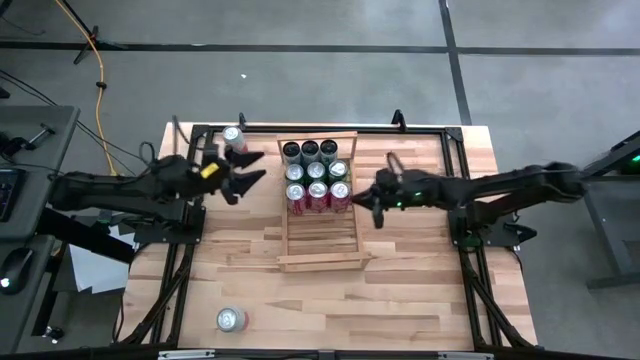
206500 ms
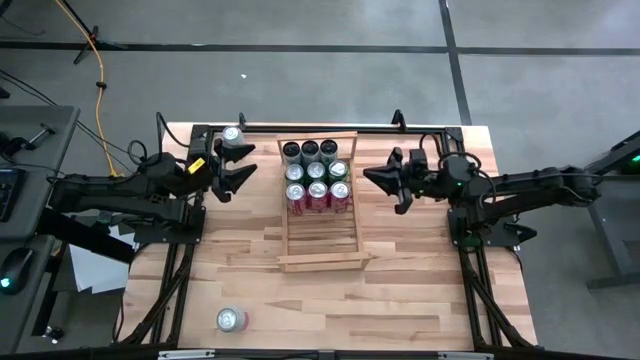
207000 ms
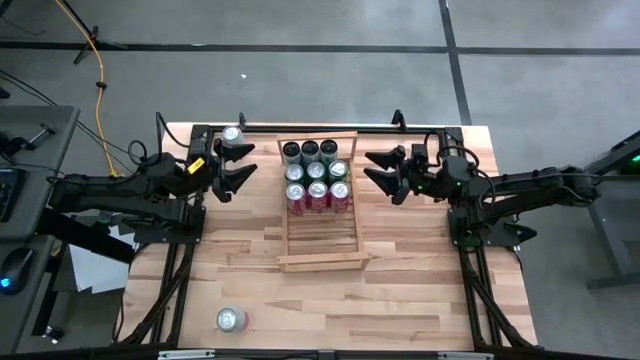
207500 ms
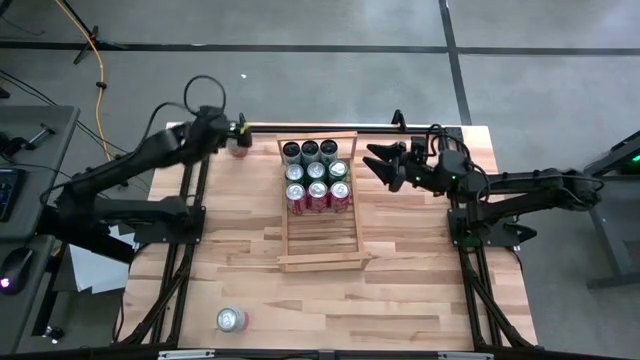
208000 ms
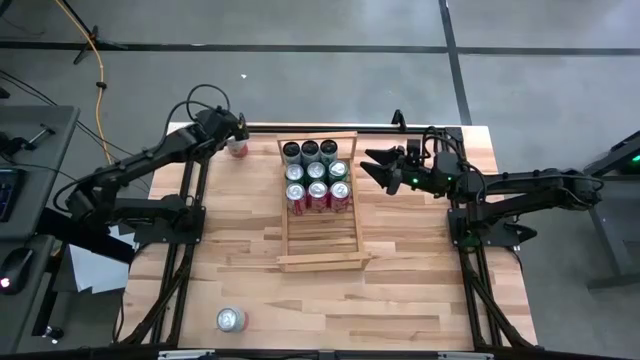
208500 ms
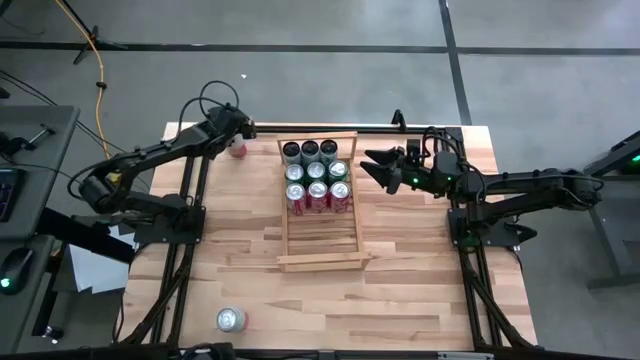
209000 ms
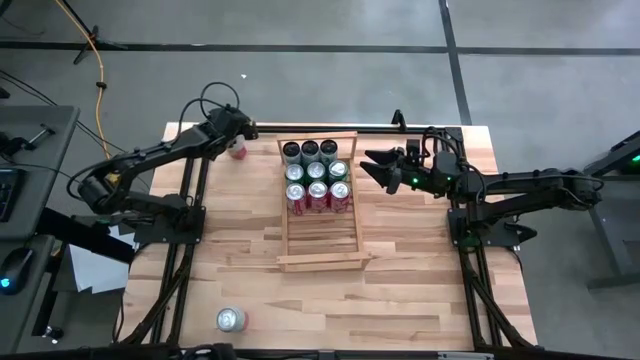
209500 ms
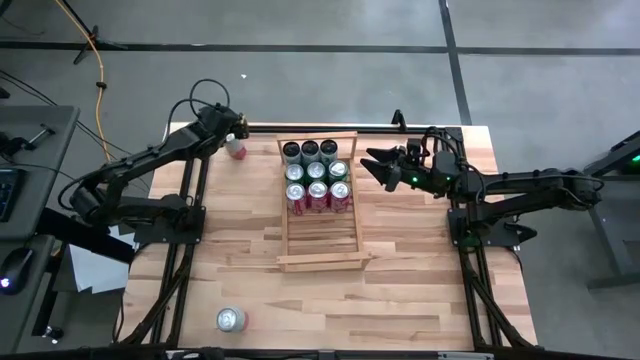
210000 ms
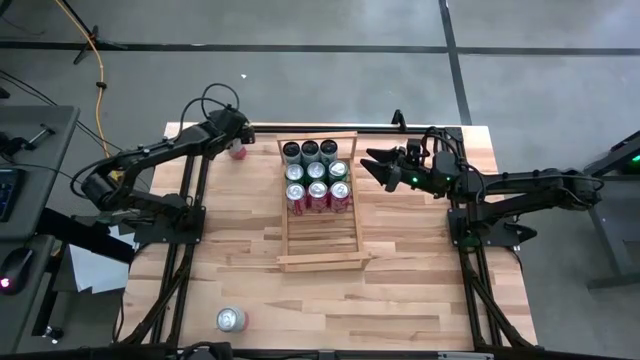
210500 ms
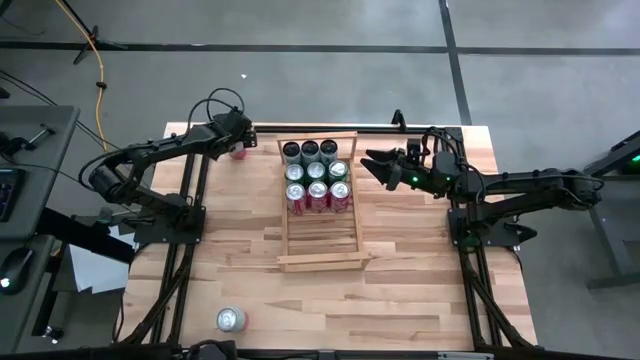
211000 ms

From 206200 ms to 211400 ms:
Task: Place canned beverage on shelf
Put the top pink can on the shelf

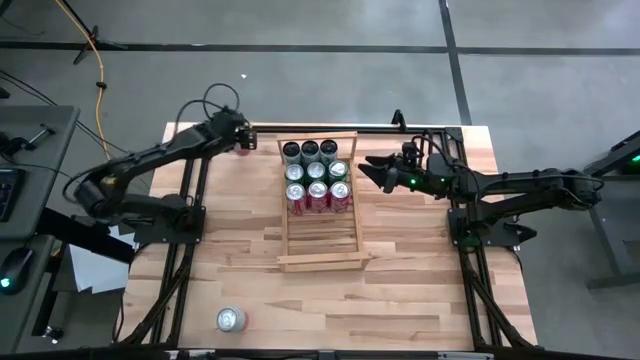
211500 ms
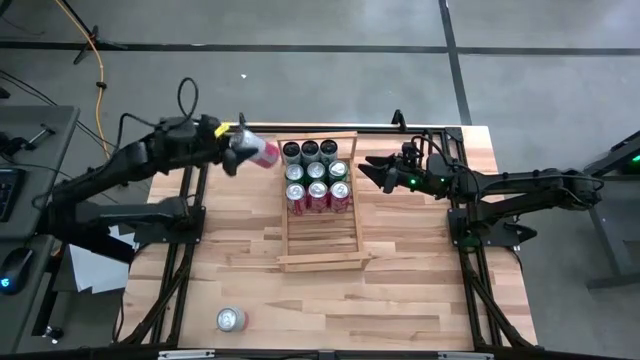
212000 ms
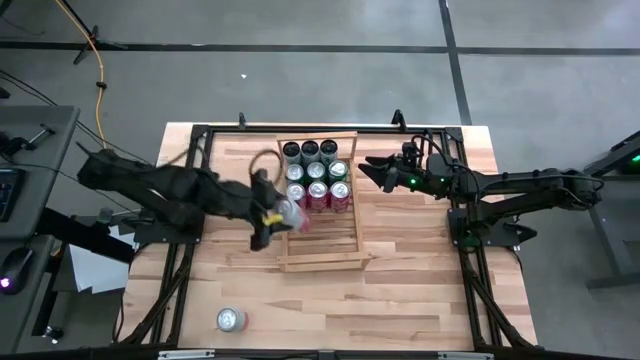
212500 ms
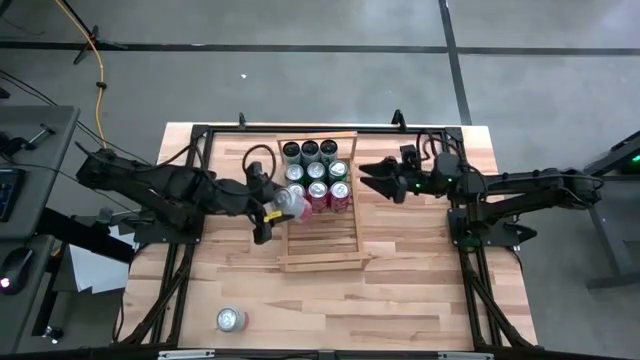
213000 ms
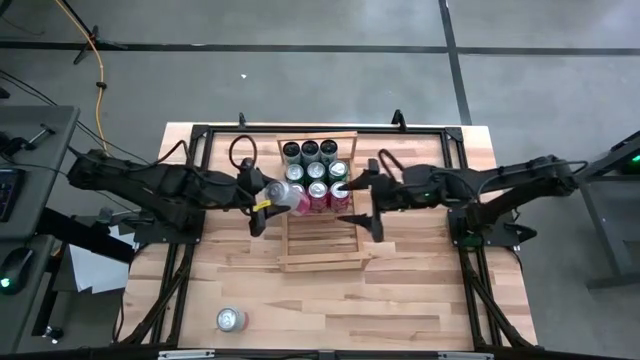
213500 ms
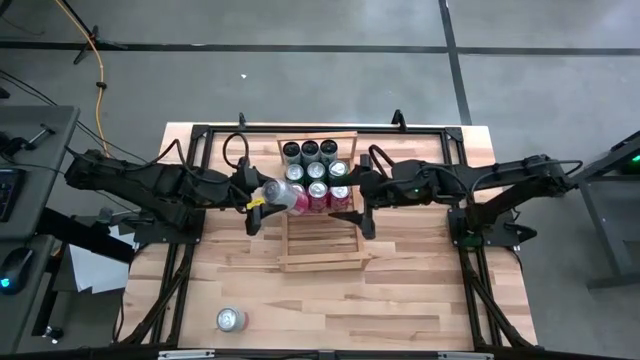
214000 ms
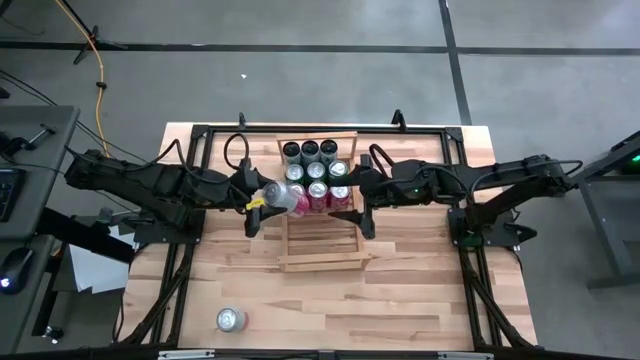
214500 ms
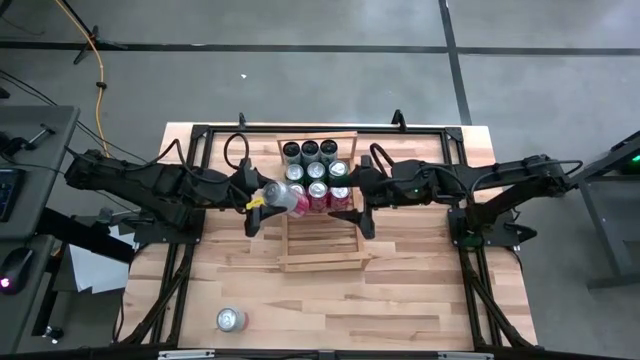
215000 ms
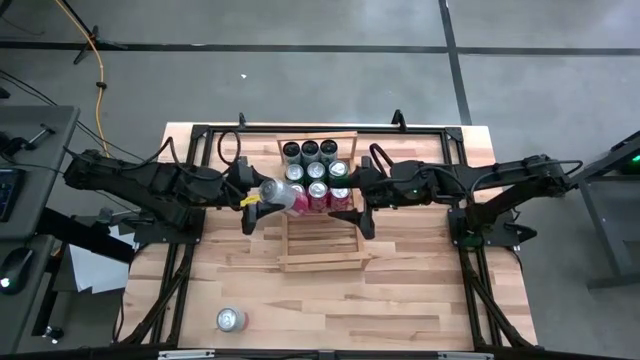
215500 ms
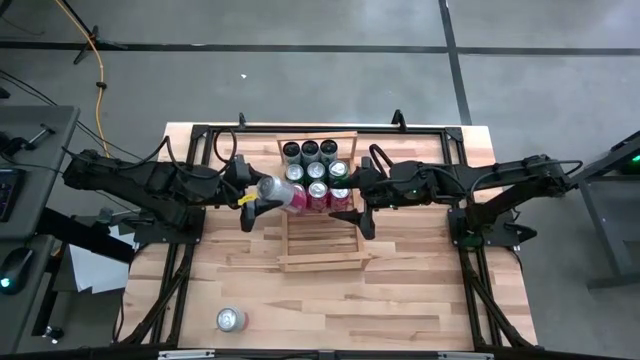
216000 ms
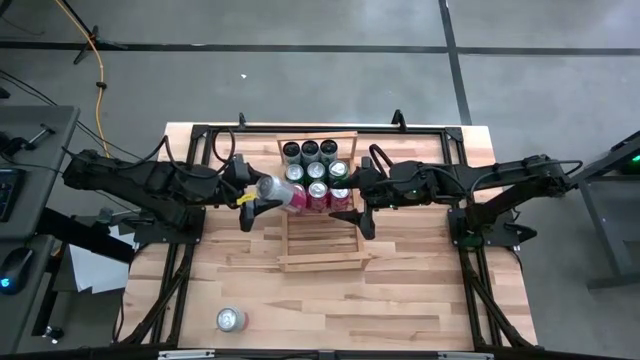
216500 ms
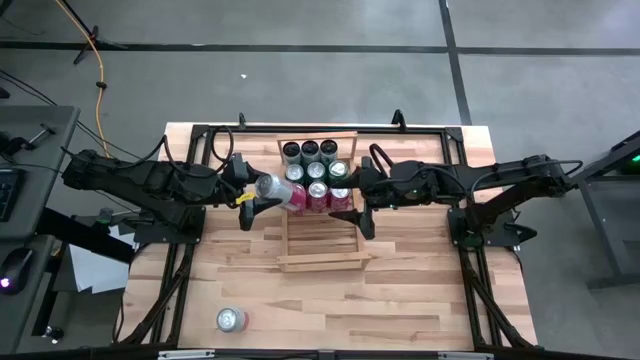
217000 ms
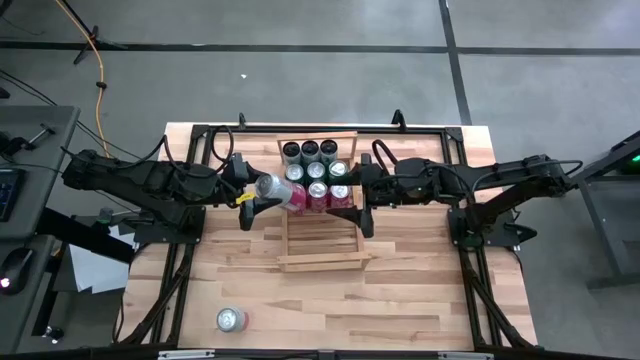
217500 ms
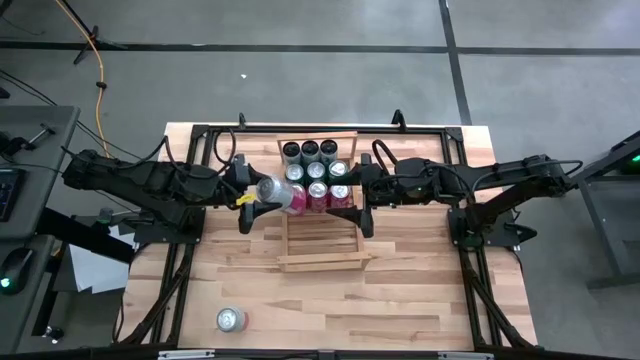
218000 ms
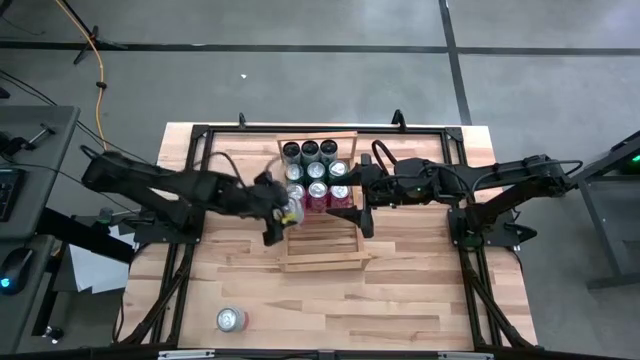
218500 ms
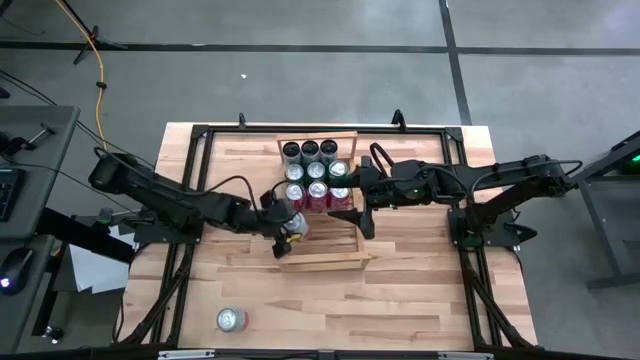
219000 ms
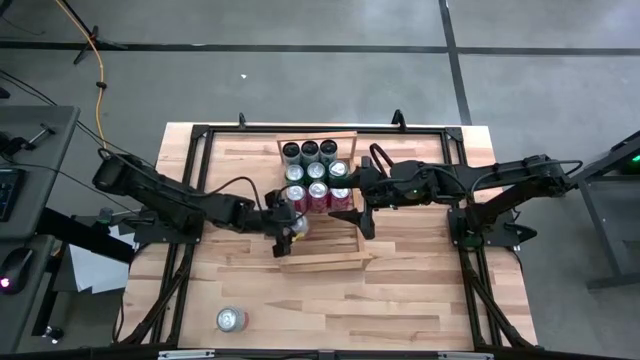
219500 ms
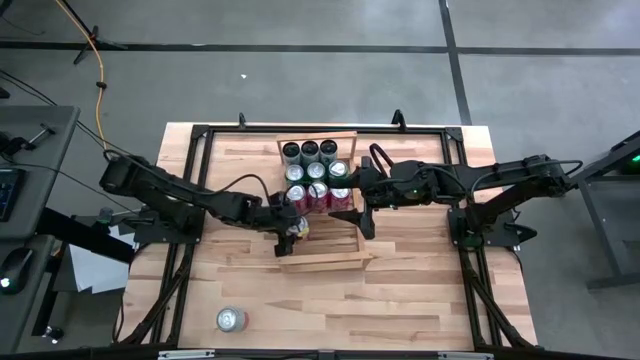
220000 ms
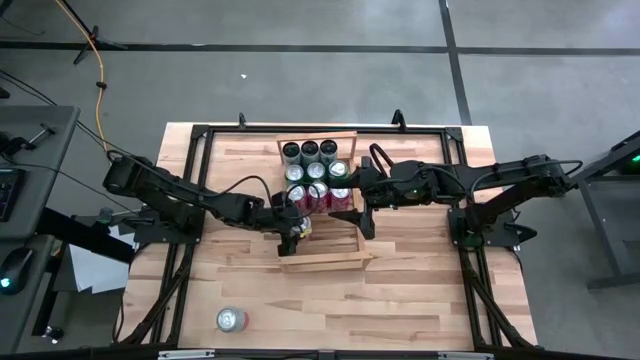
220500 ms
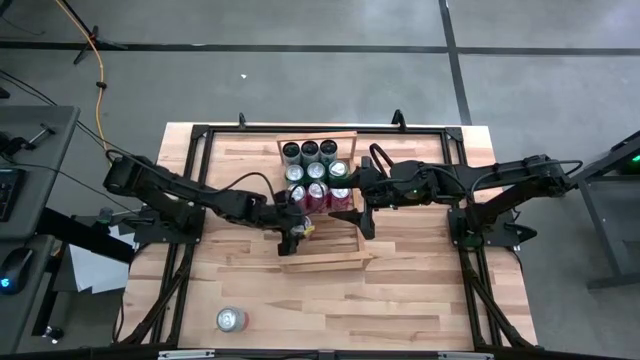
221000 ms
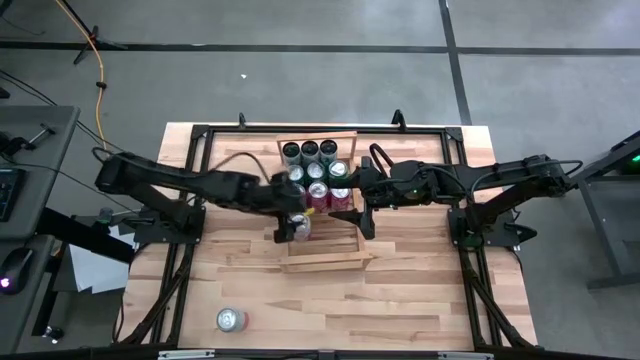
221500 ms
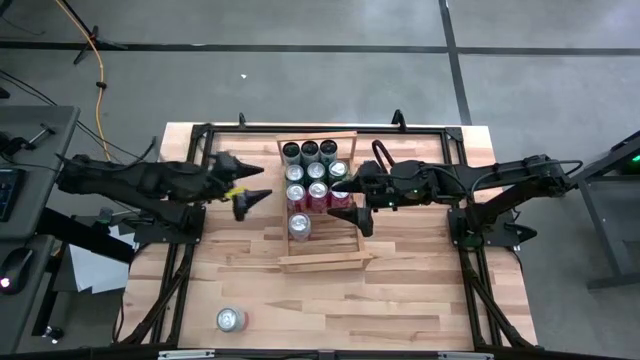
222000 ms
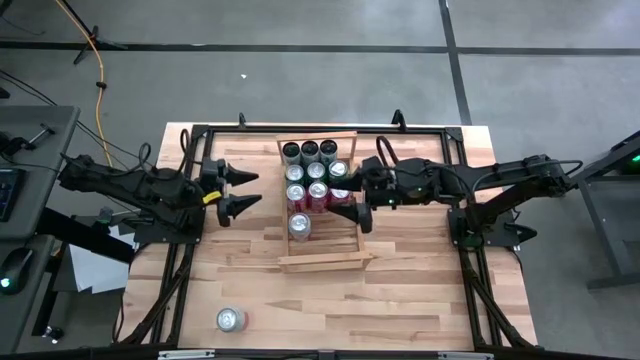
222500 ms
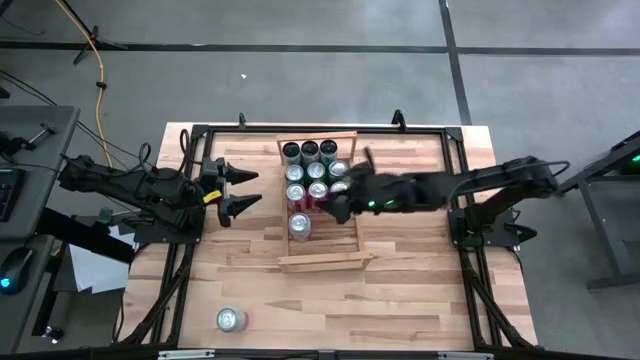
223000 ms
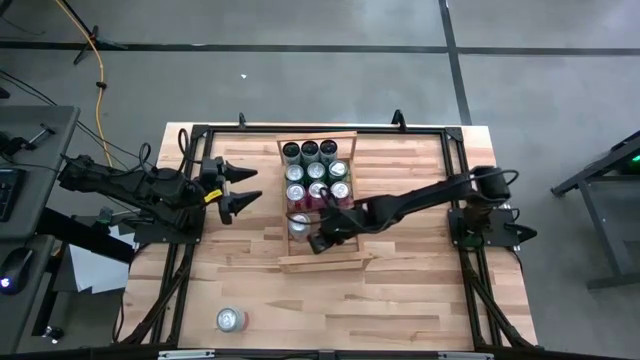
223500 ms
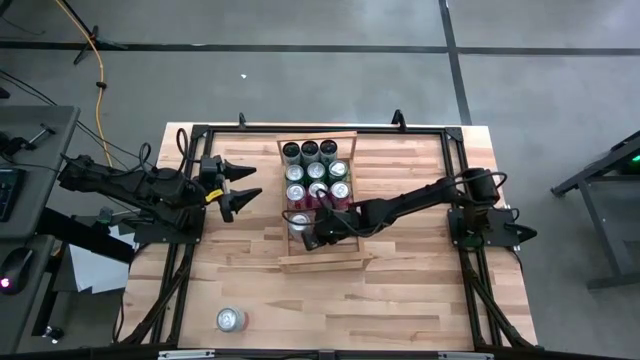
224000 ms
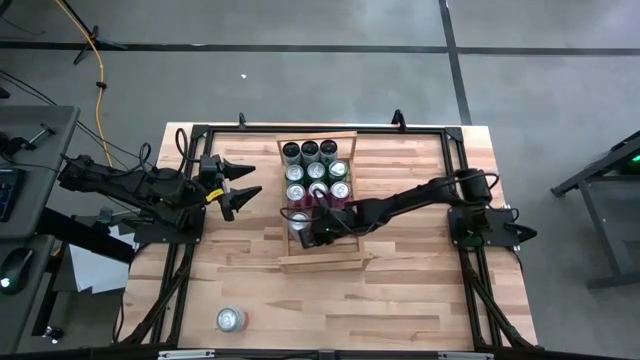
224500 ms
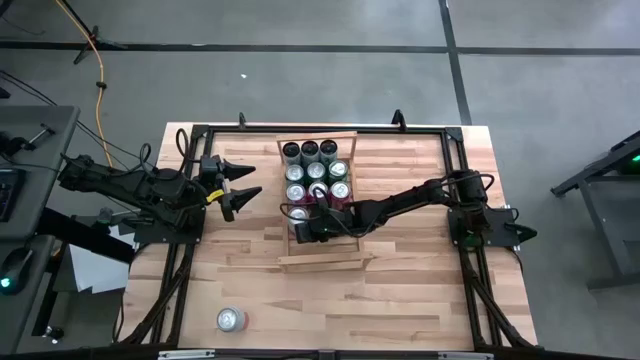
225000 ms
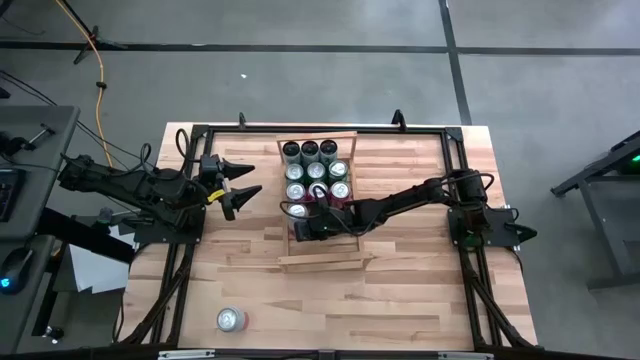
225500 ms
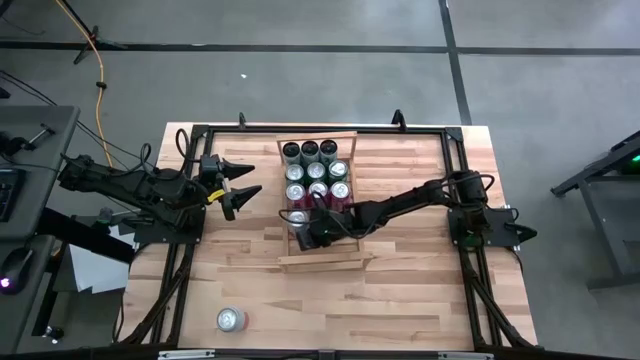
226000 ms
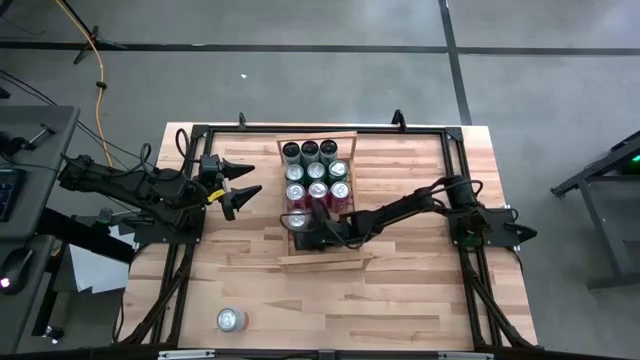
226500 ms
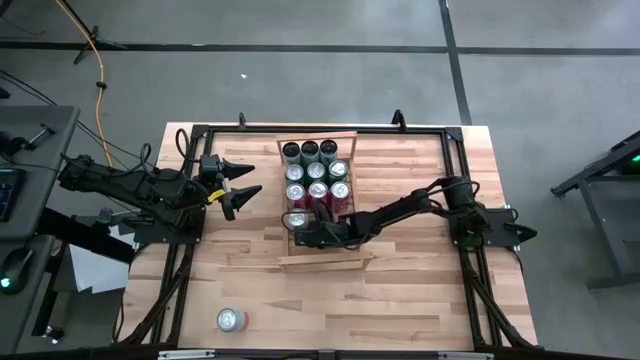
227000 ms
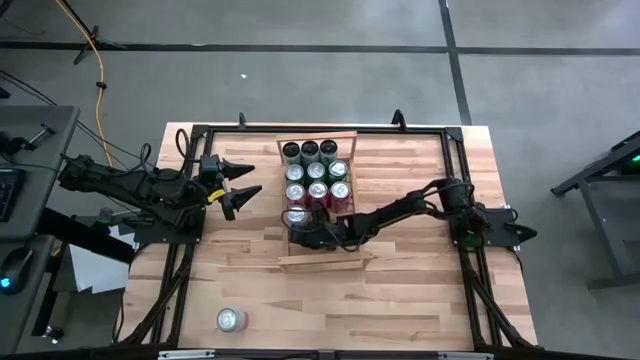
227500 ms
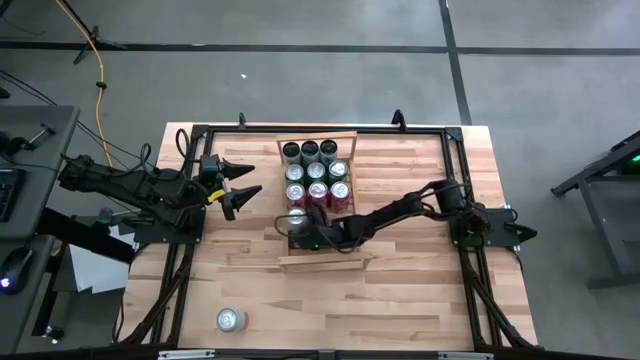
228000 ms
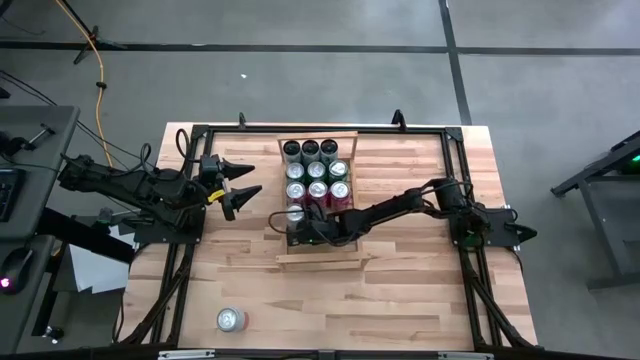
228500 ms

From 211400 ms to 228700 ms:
Put the top pink can on the shelf
